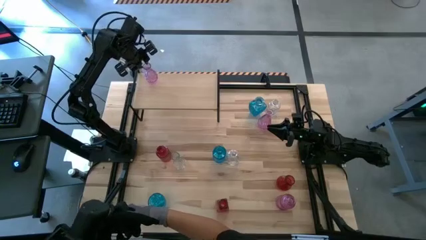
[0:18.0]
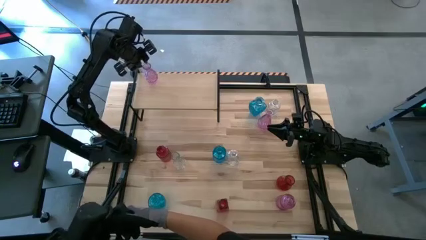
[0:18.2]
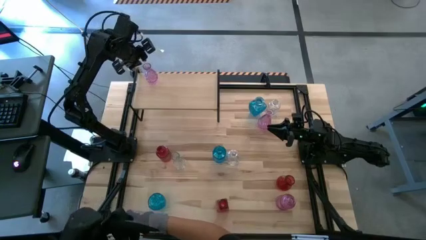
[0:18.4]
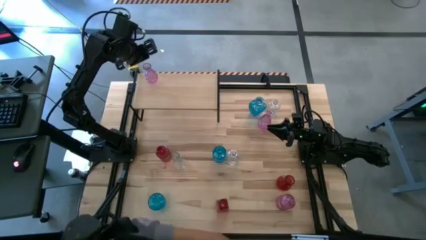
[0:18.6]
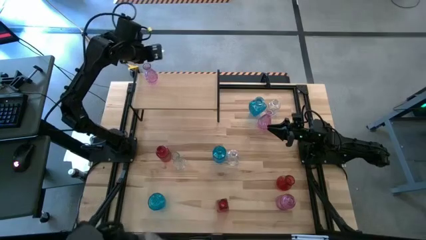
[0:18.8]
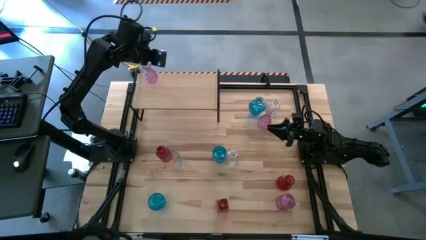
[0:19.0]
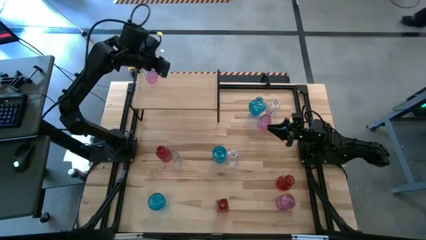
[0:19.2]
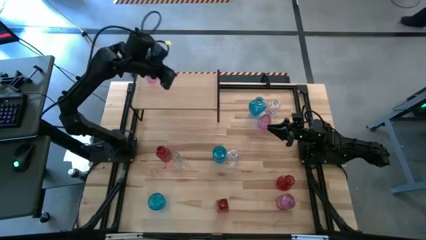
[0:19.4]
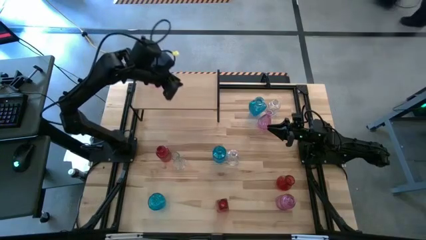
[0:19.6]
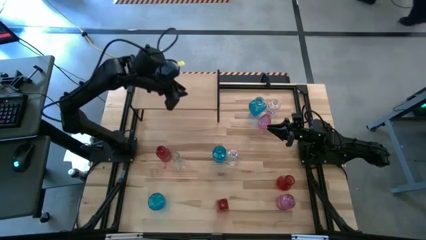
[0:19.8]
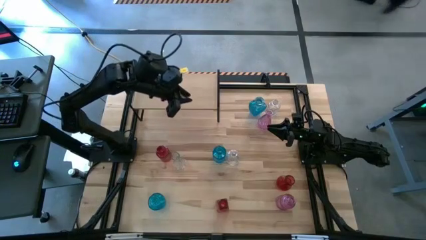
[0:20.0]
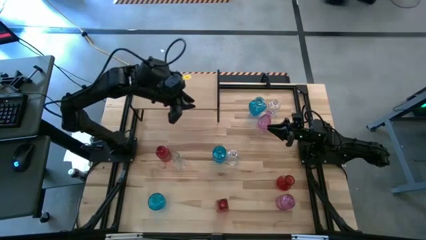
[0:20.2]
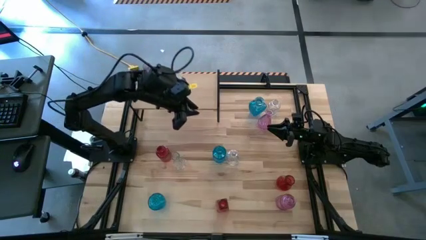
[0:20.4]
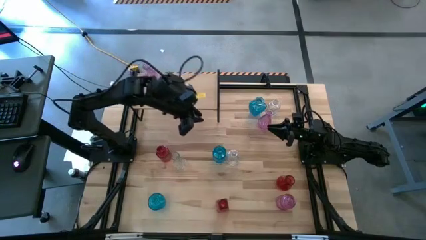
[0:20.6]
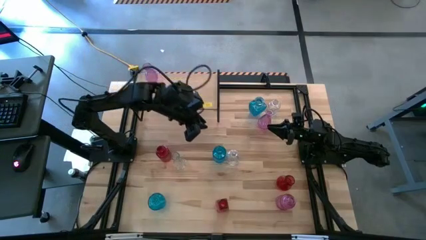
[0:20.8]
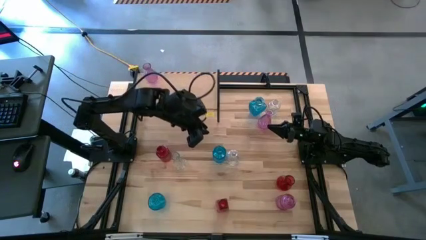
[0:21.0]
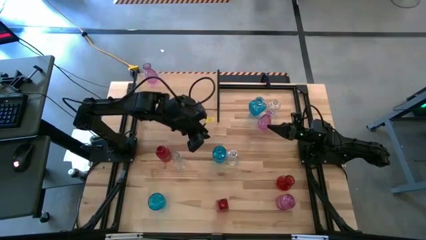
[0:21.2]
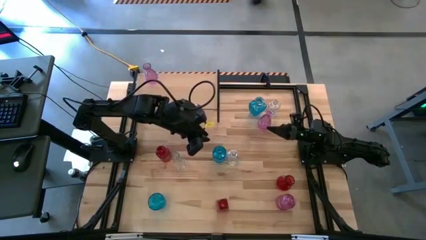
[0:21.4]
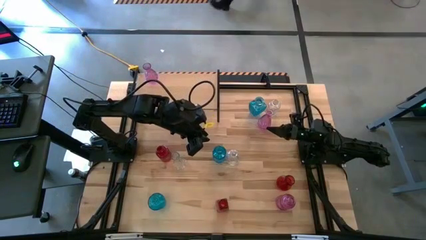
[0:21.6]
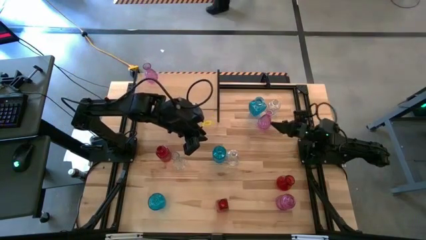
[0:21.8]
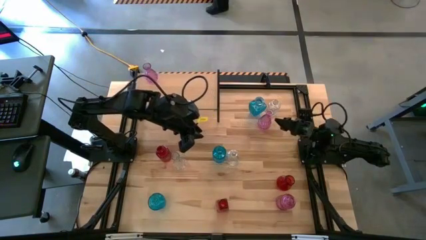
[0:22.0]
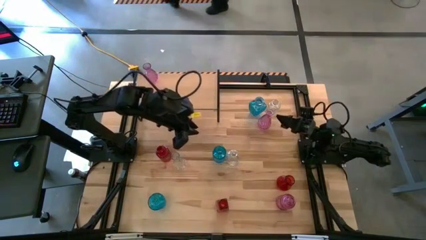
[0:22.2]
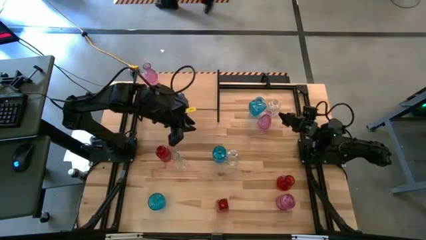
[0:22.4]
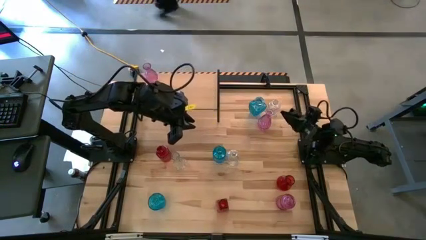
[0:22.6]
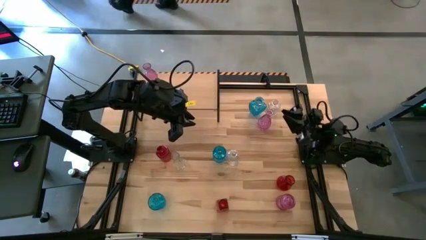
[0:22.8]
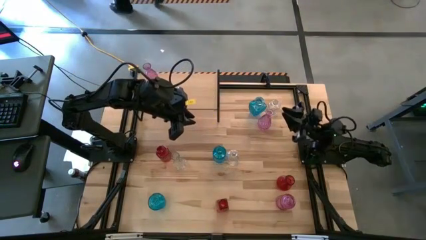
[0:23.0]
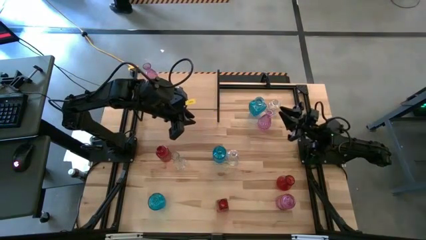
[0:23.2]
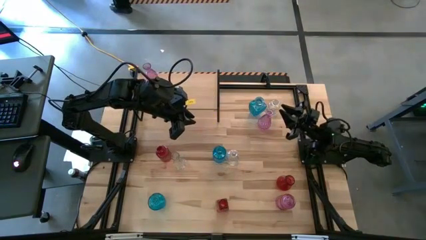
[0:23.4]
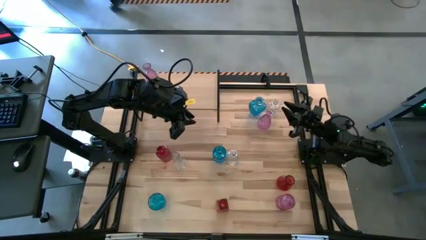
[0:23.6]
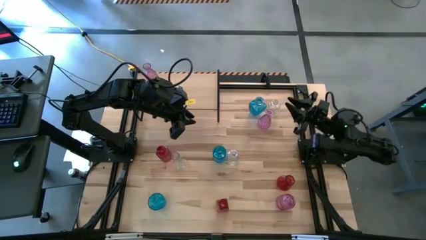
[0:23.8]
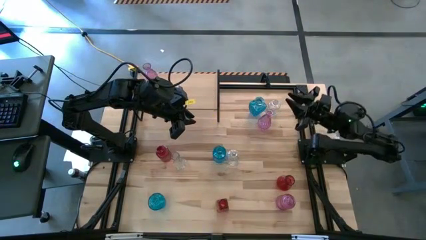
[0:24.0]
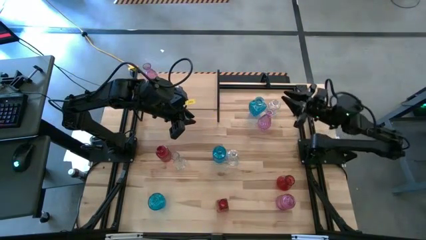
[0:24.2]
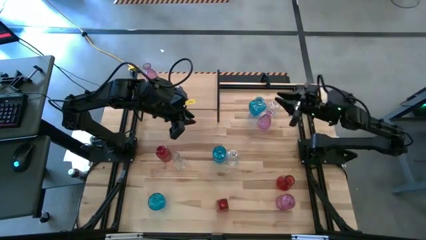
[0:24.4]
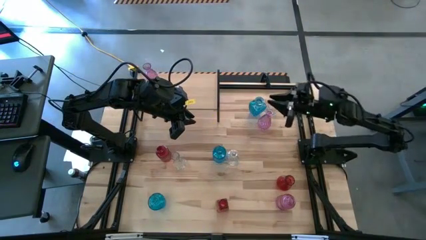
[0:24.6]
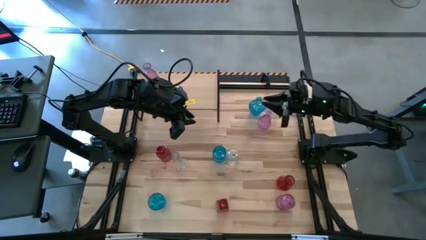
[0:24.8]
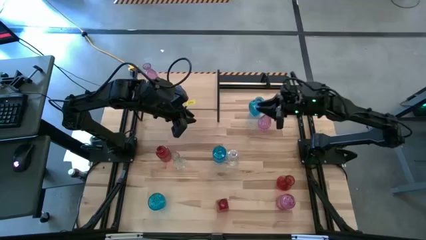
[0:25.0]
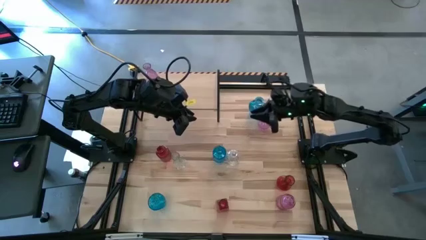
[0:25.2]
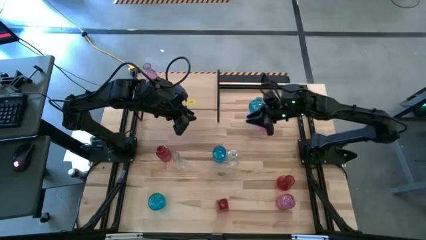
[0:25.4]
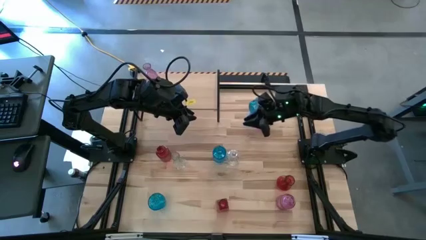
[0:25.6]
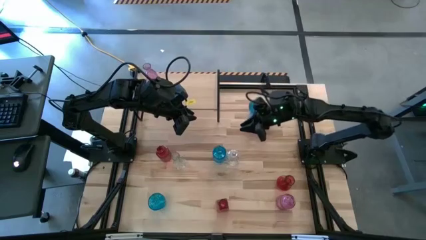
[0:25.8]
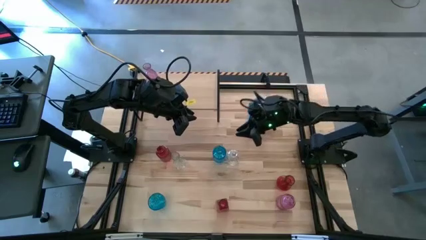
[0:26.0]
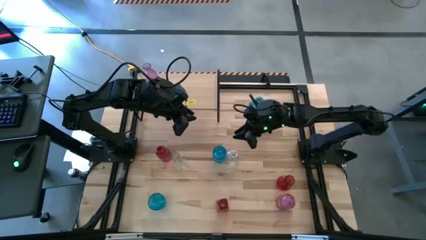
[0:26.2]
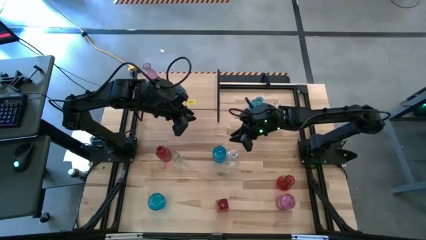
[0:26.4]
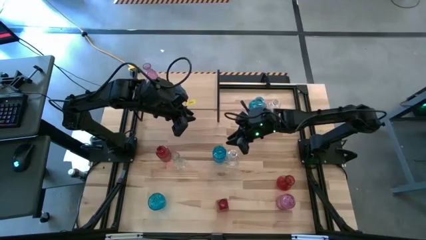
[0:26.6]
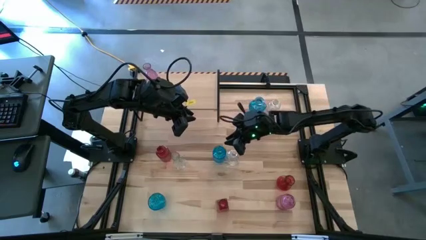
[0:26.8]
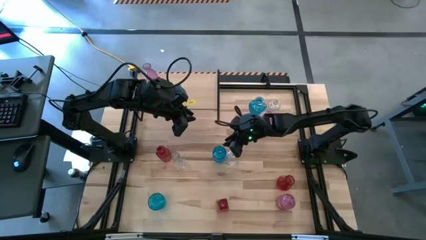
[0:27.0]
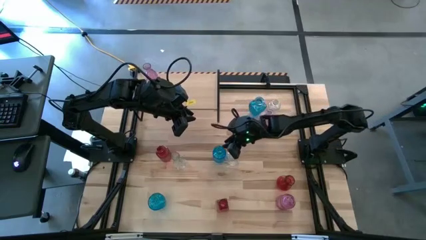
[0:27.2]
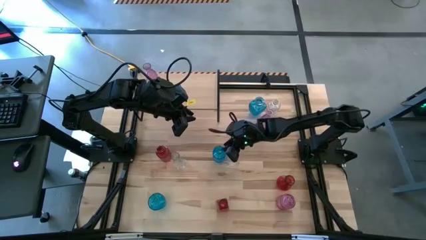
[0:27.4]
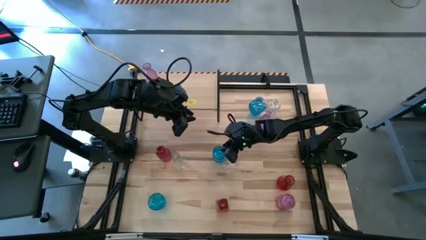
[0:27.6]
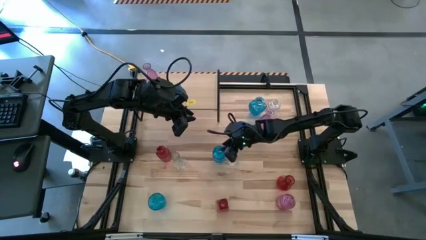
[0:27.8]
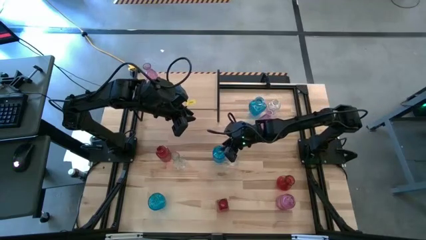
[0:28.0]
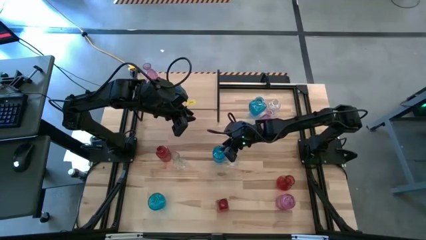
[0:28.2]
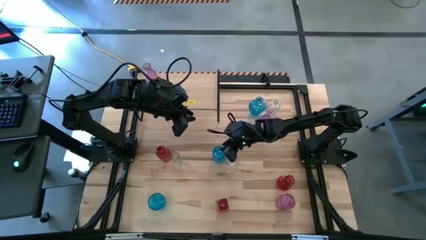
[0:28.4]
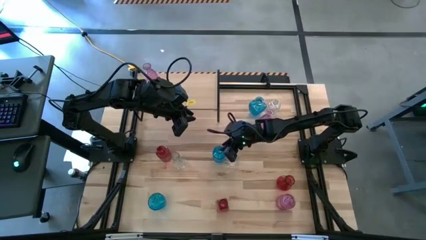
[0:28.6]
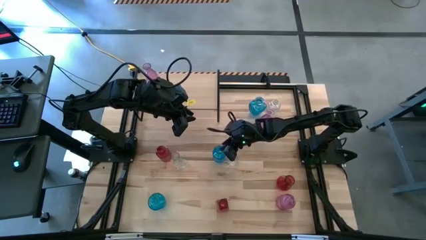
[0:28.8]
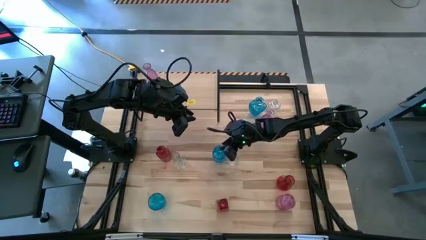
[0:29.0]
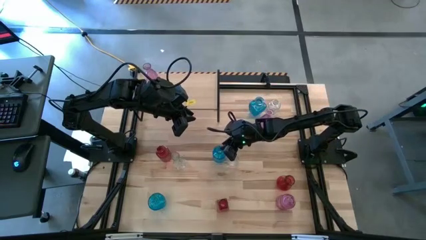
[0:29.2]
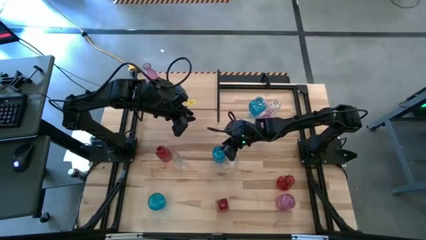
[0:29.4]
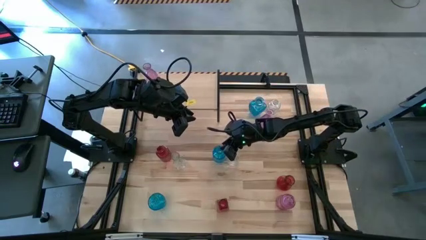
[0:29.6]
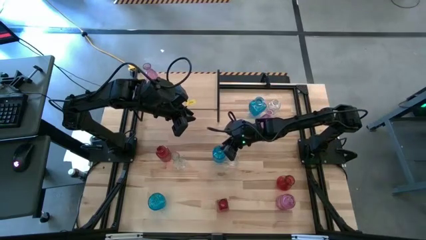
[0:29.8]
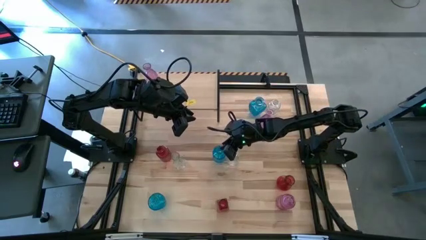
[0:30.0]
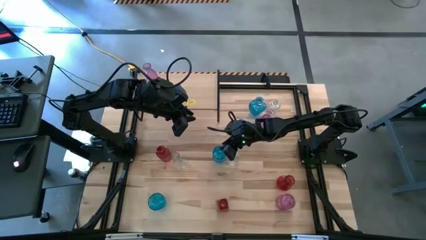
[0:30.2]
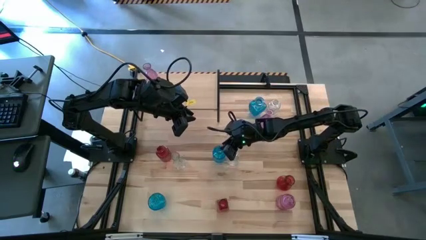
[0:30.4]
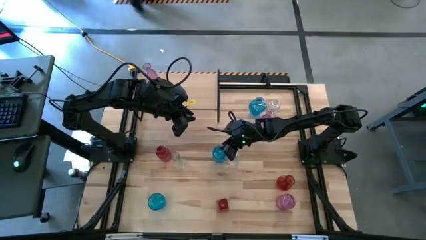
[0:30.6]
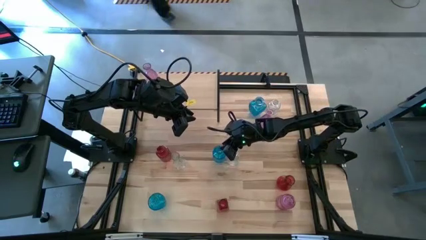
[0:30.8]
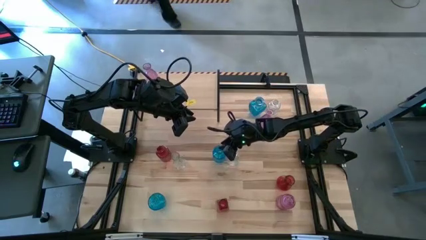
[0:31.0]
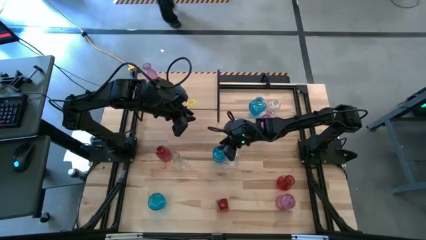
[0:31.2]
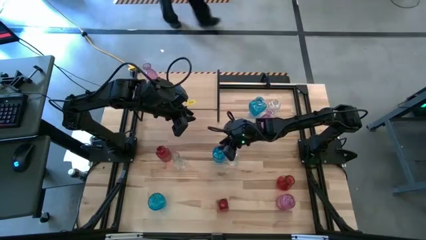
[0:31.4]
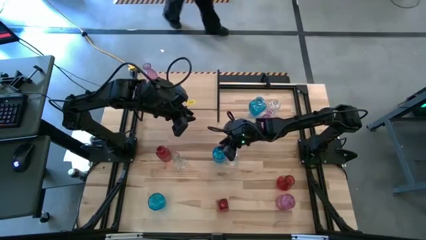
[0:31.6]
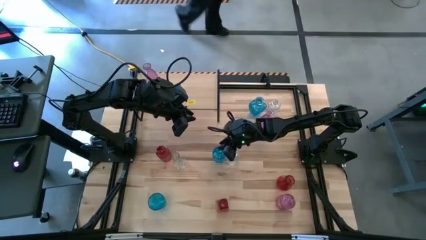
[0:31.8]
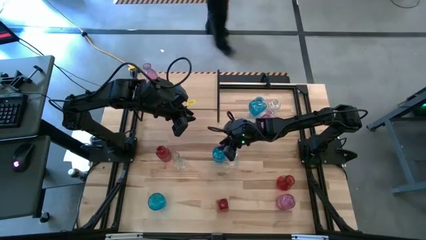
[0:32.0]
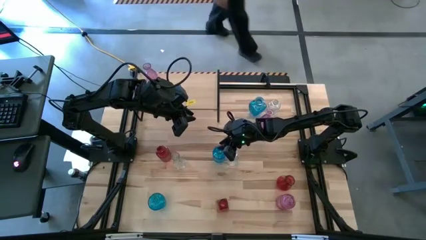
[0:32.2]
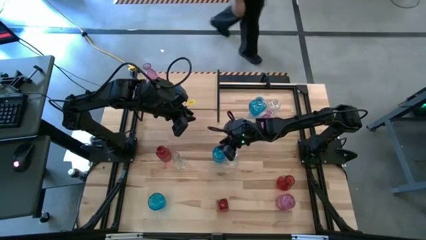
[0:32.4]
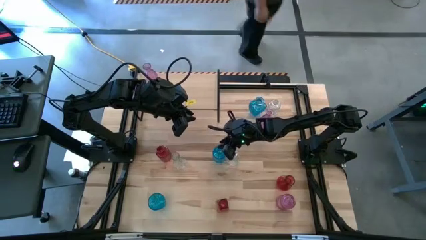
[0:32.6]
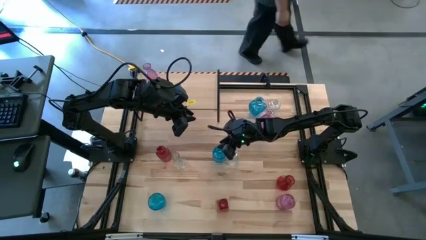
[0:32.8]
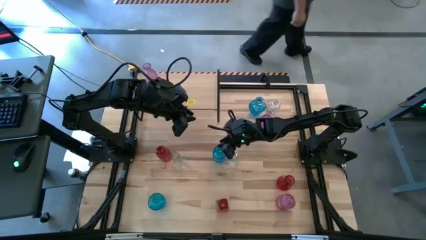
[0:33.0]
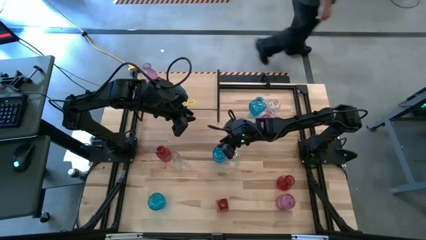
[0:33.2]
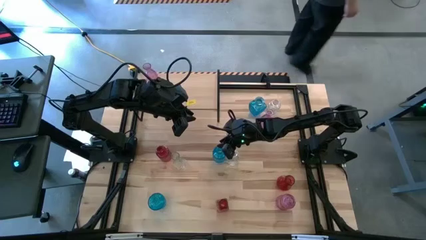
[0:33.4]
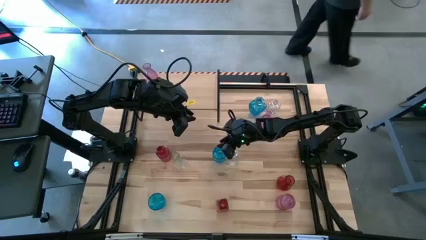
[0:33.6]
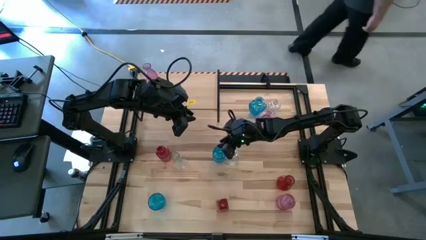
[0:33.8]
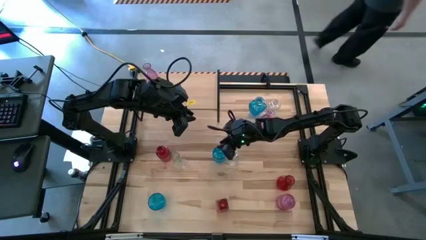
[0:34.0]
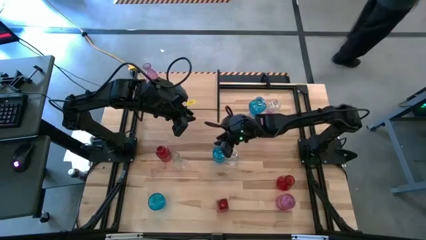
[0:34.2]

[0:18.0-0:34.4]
Task: sort vases onto shelf
Put the center blue vase on the shelf
